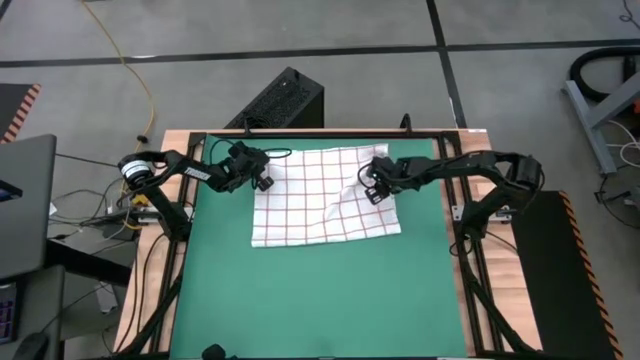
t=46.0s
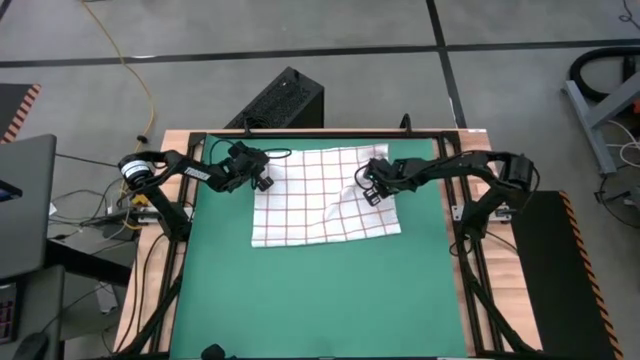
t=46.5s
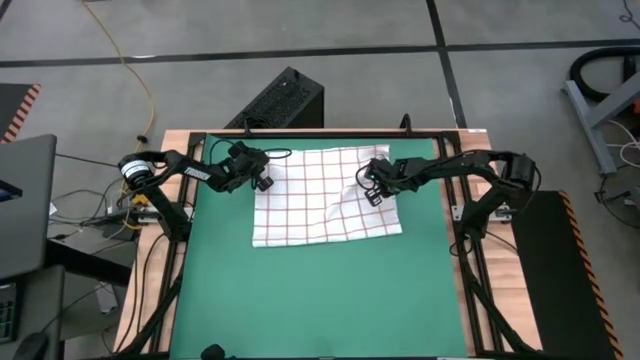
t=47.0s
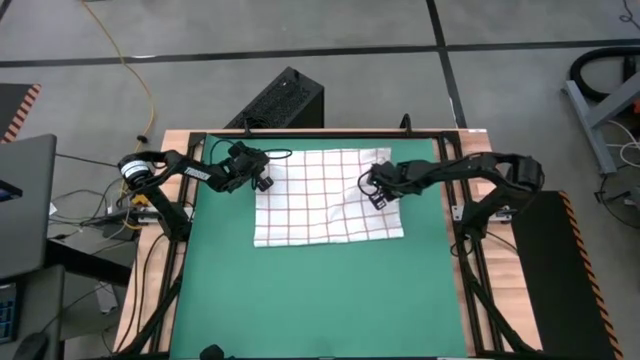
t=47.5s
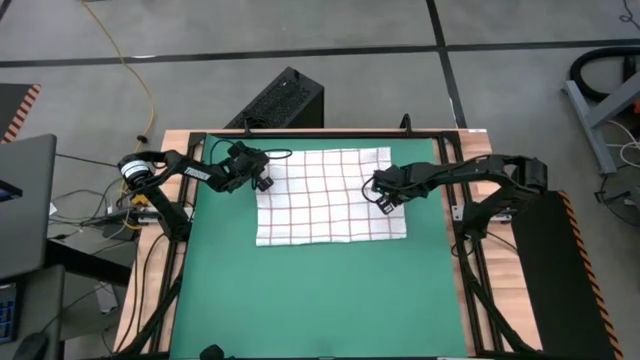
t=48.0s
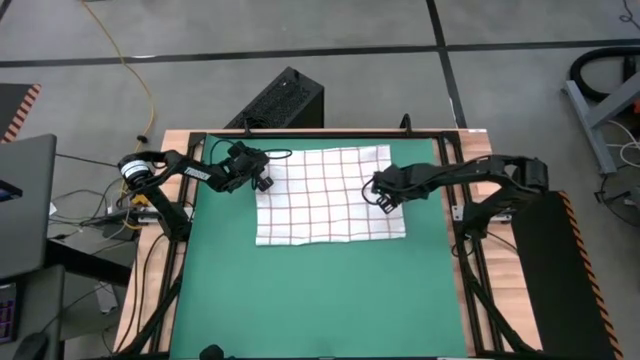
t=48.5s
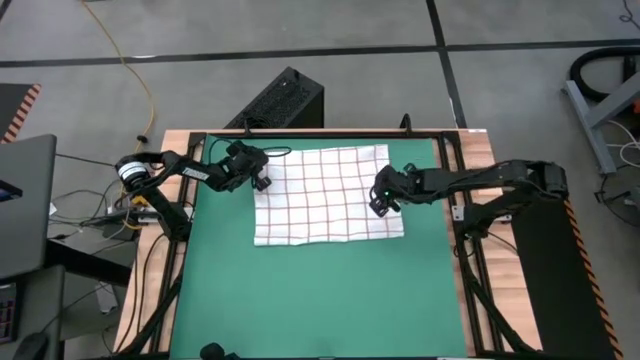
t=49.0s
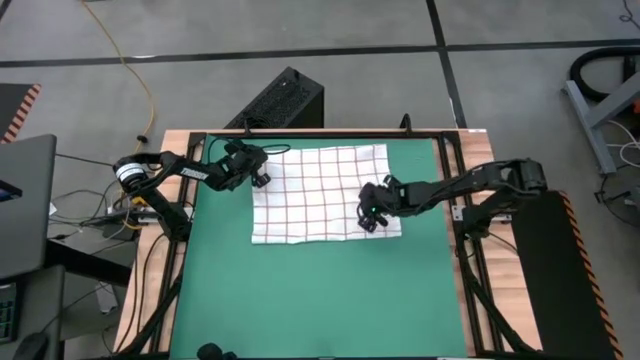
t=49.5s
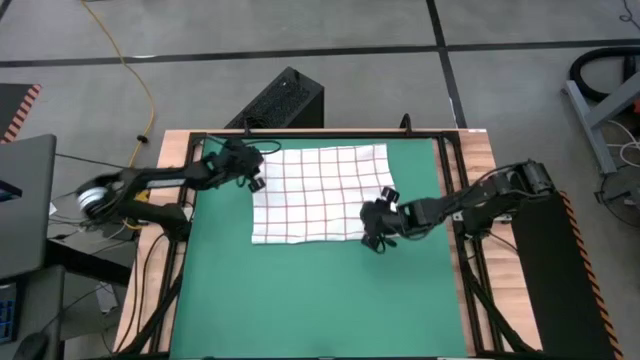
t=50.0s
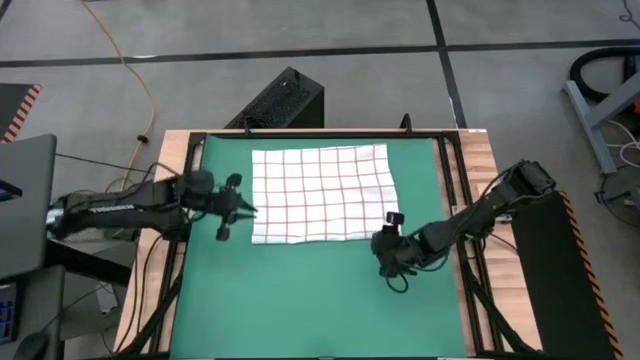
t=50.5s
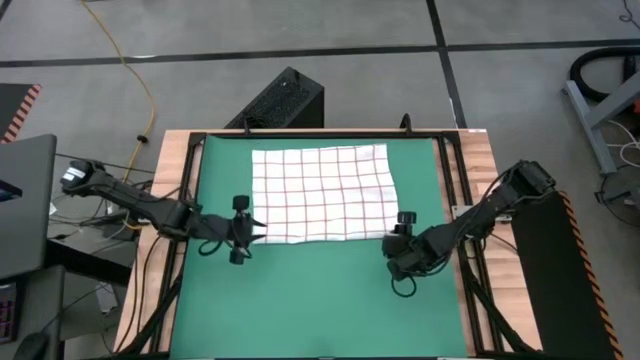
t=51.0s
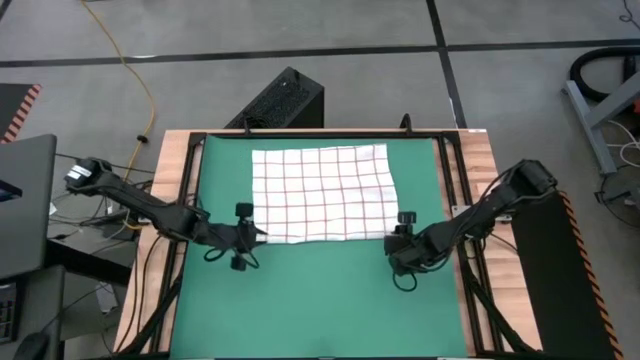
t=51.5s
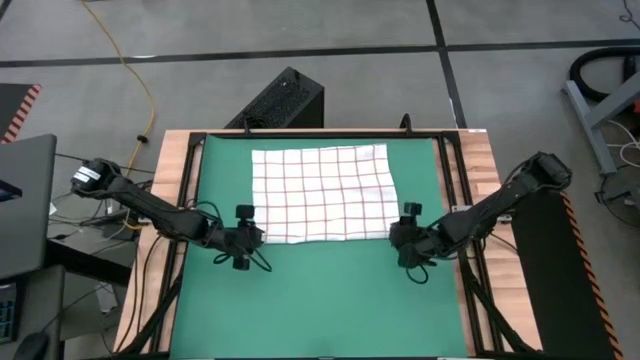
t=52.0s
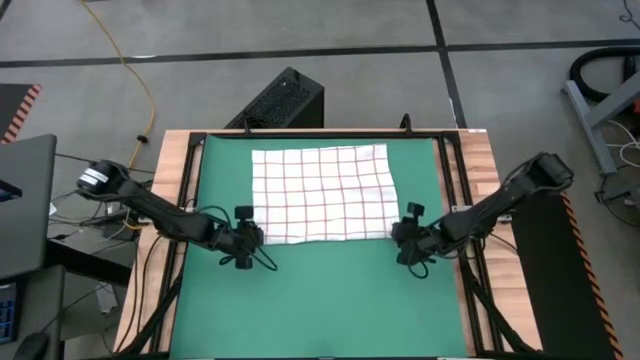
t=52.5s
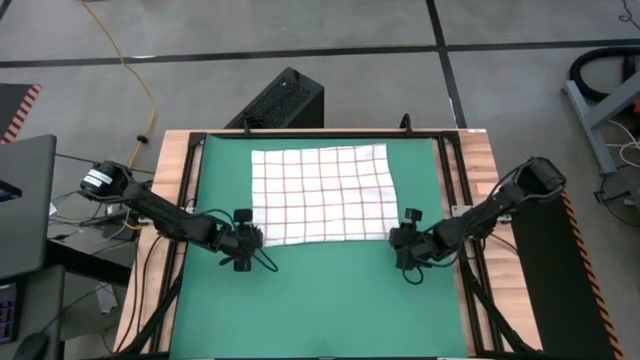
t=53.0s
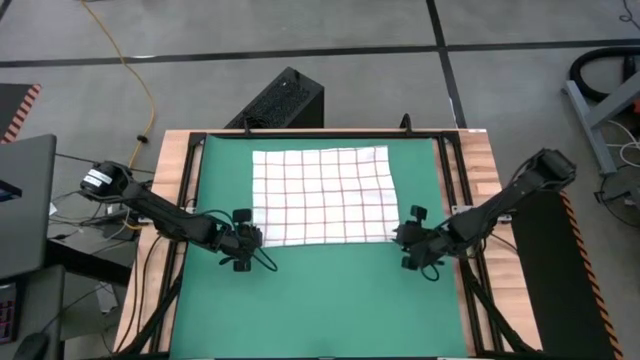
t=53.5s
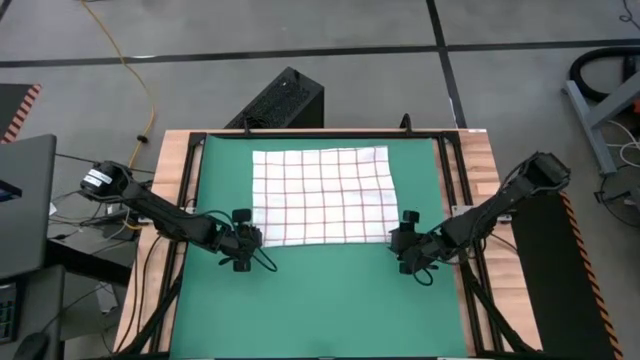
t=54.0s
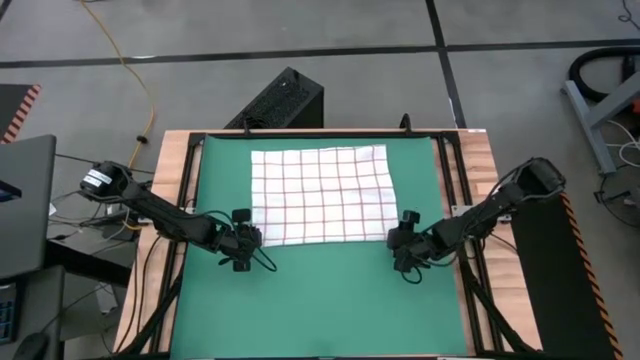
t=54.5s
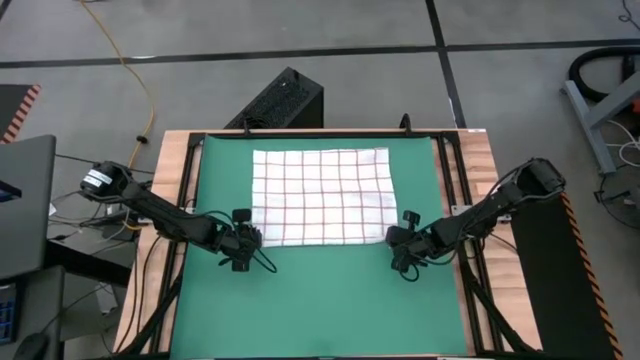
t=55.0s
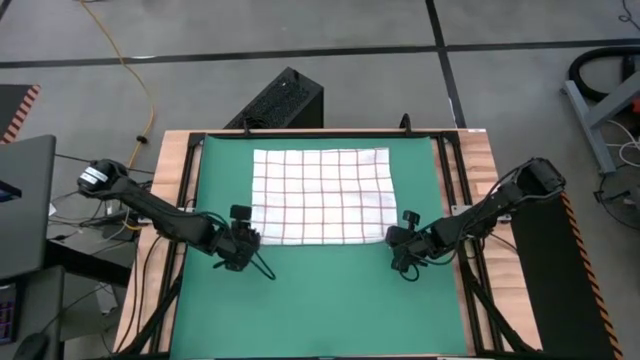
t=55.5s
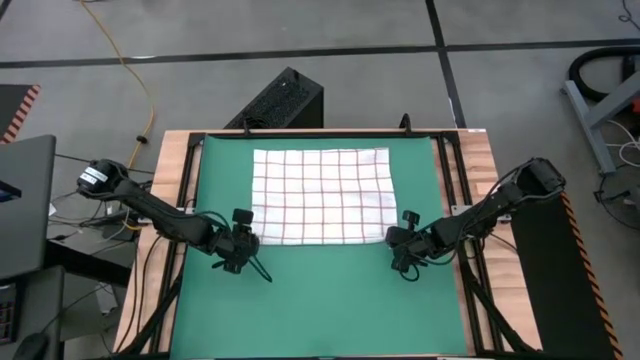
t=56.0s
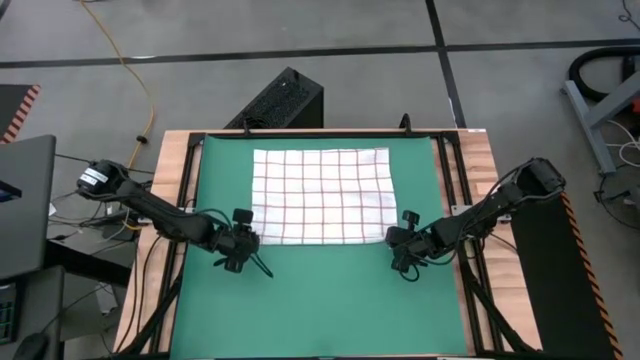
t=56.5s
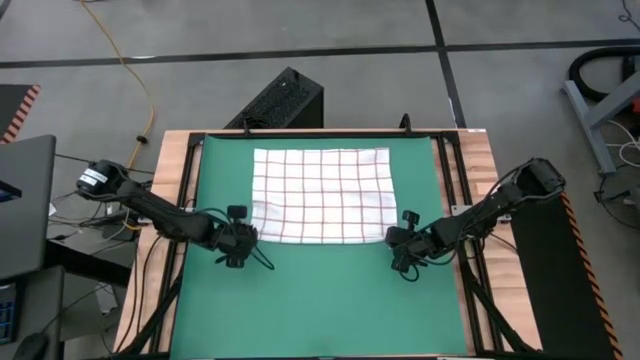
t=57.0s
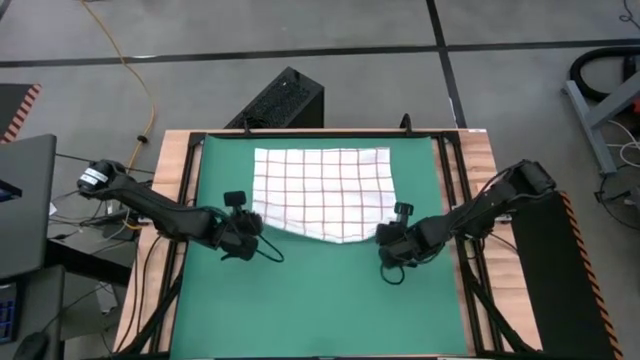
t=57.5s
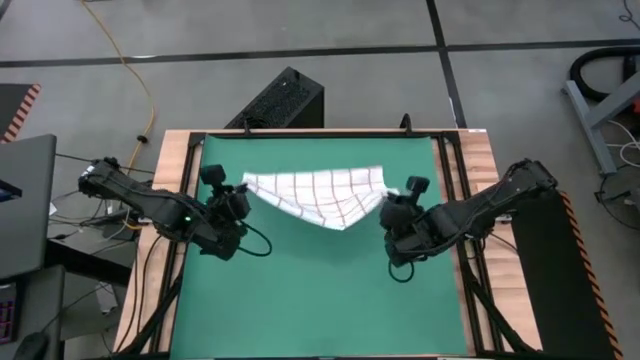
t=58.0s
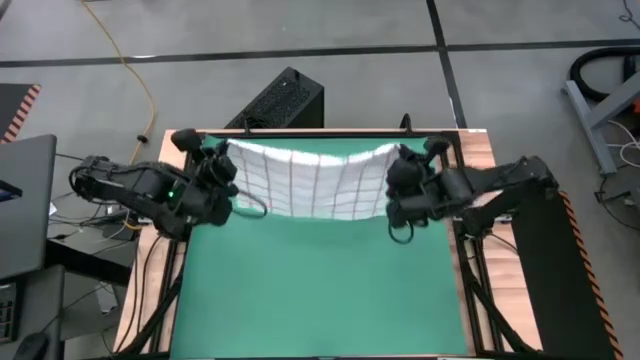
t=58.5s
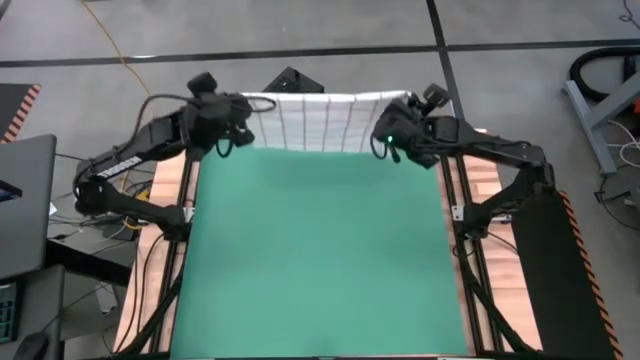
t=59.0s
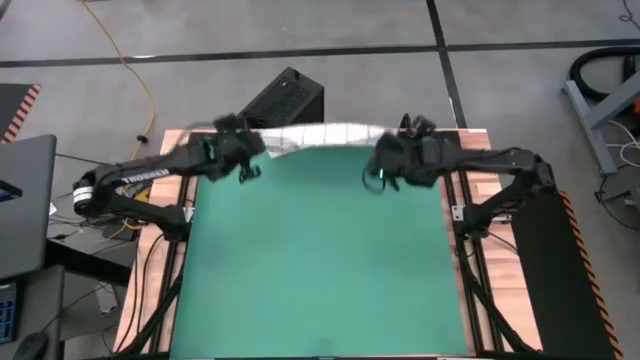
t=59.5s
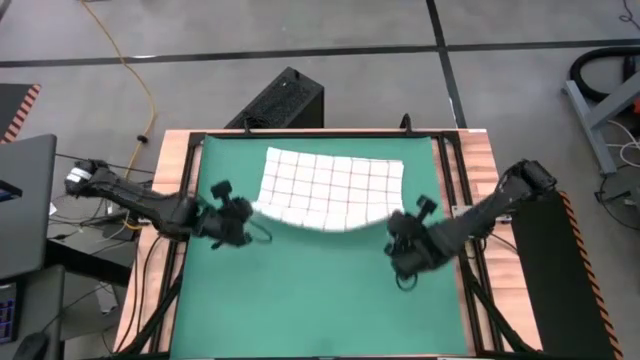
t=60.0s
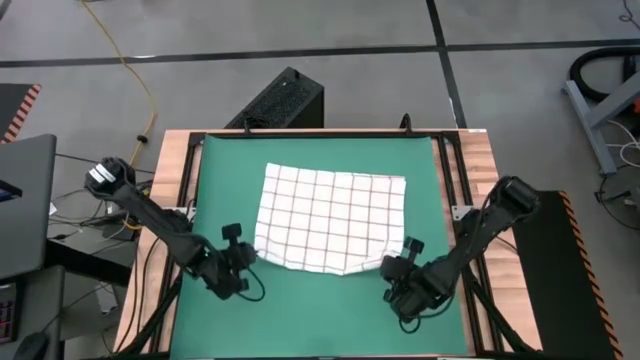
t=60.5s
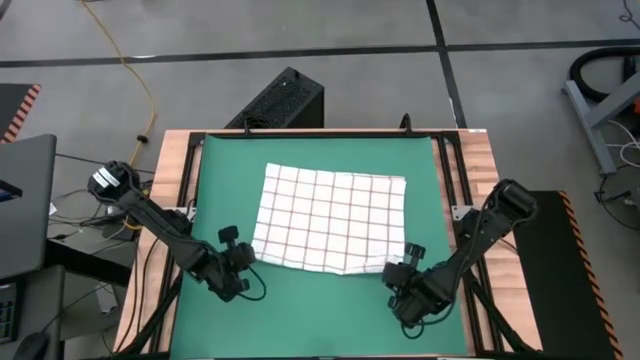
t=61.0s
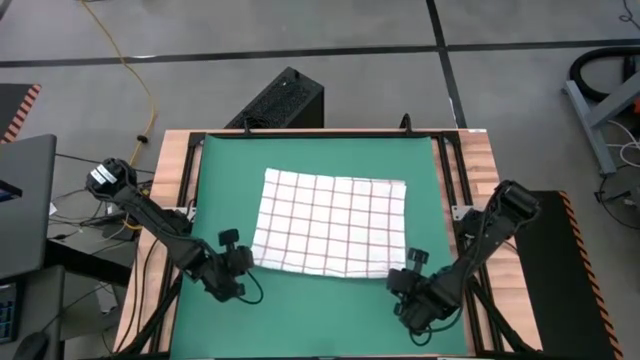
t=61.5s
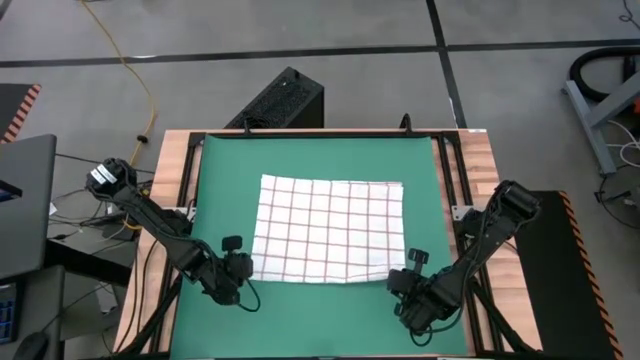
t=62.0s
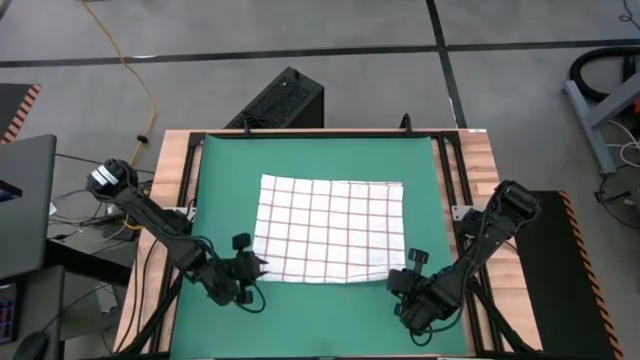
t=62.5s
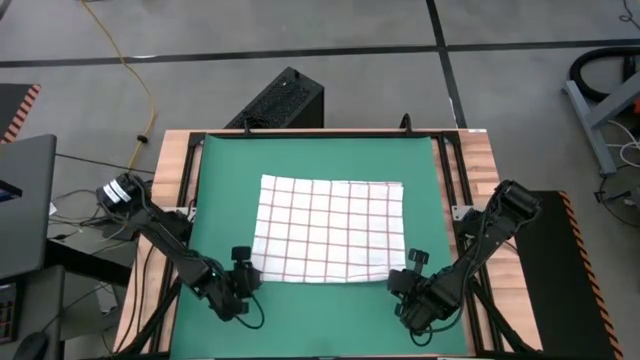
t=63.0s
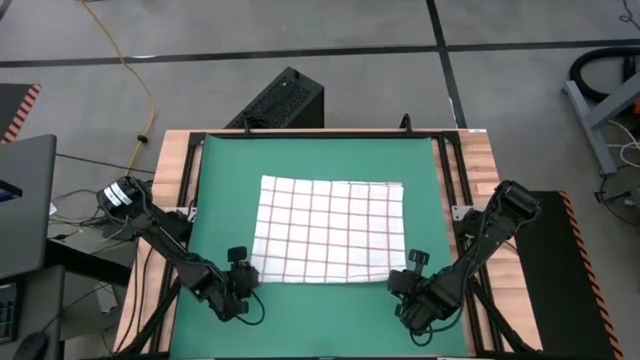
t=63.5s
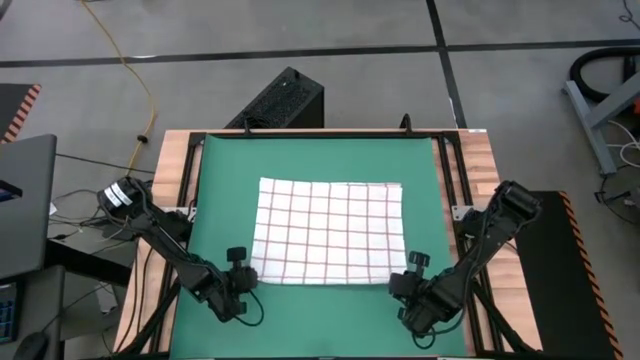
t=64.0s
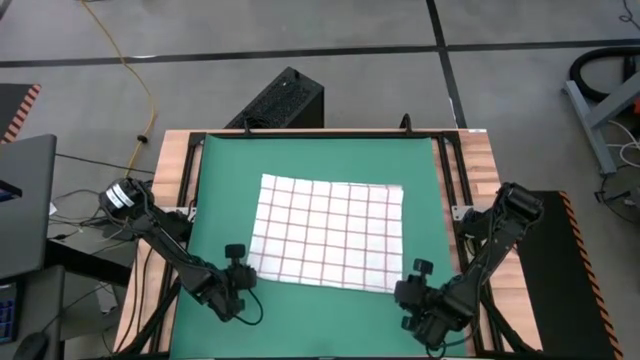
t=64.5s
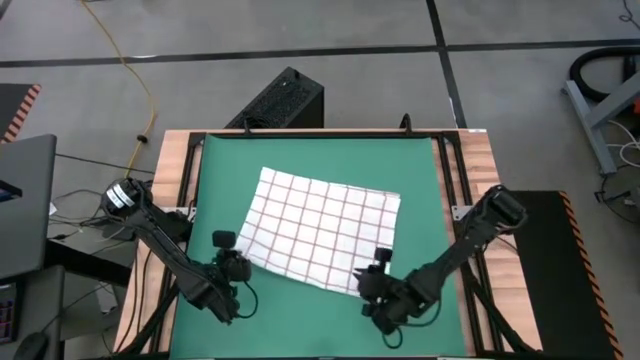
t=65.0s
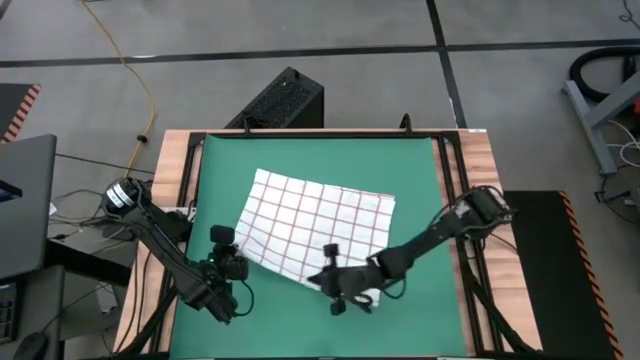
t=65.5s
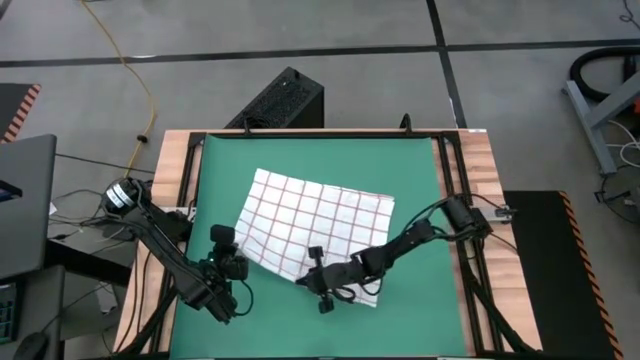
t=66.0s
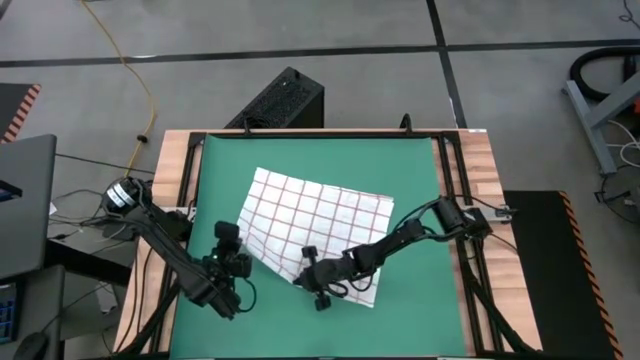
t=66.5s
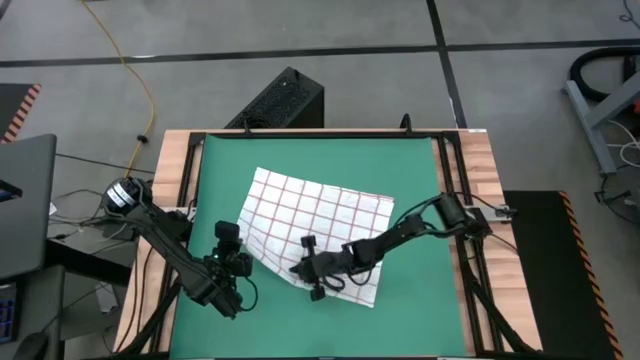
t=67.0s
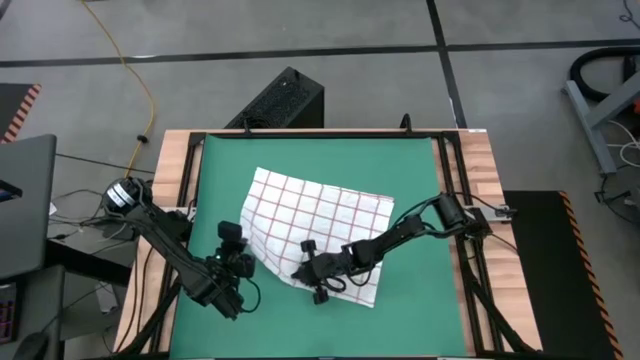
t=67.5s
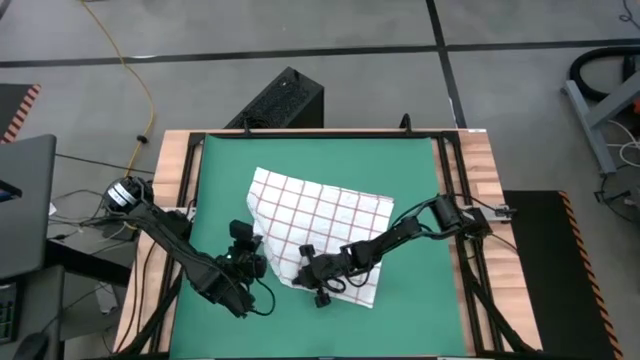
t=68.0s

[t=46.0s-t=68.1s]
Task: Roll towel into tight, uniform cylinder
Fold the white towel
